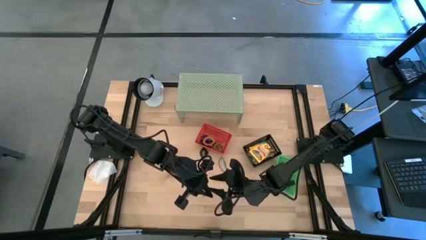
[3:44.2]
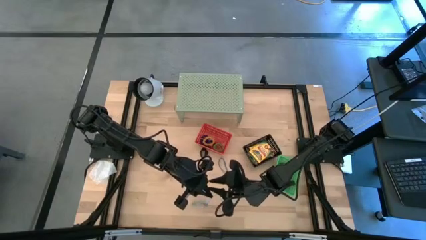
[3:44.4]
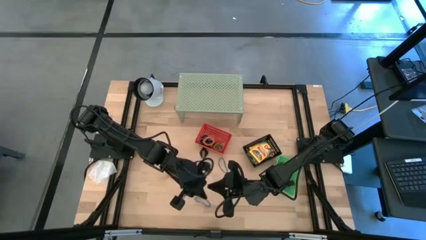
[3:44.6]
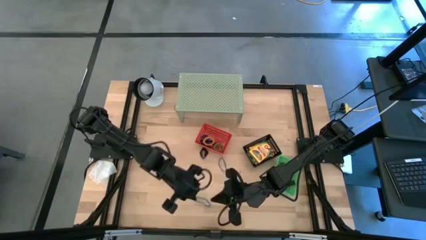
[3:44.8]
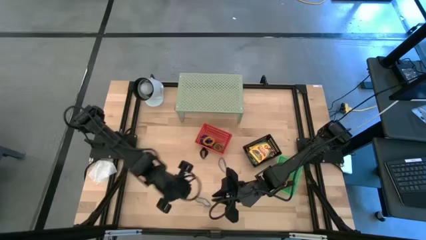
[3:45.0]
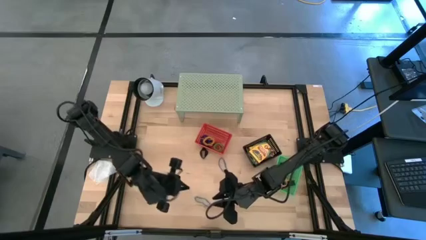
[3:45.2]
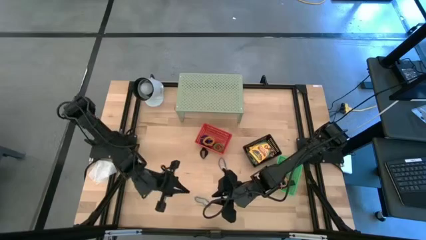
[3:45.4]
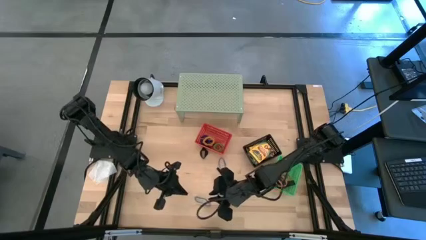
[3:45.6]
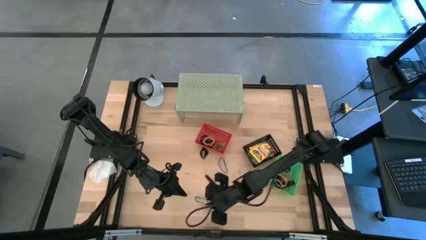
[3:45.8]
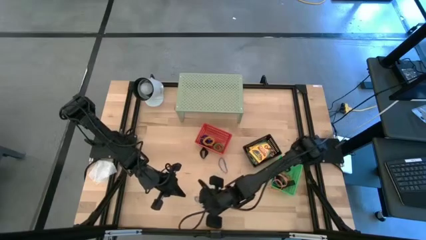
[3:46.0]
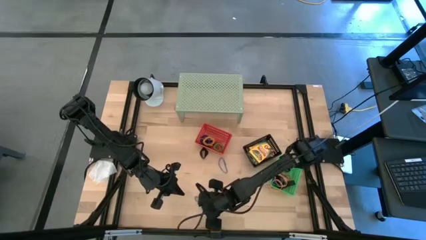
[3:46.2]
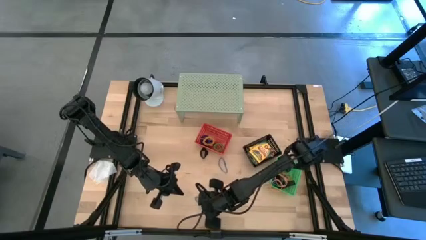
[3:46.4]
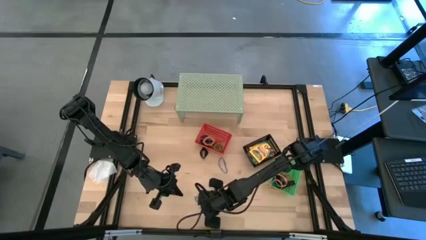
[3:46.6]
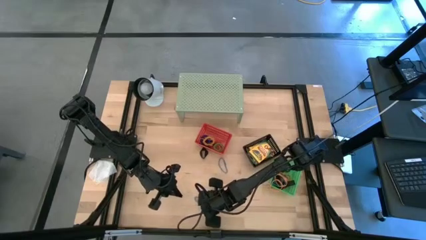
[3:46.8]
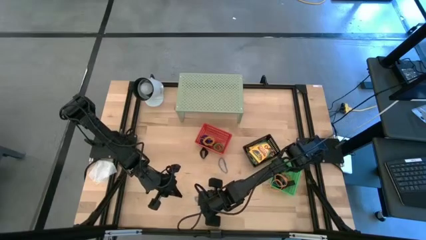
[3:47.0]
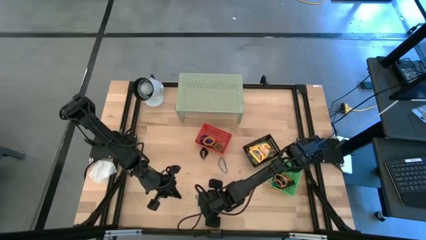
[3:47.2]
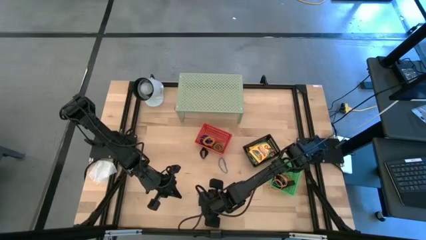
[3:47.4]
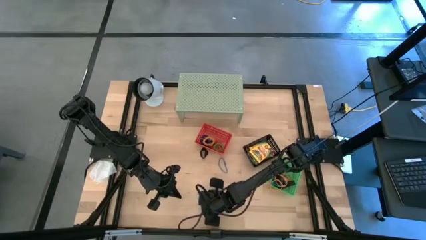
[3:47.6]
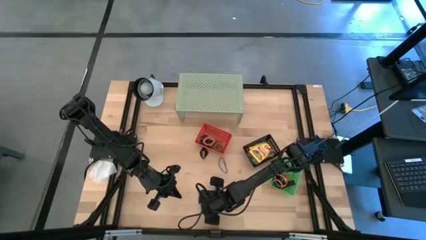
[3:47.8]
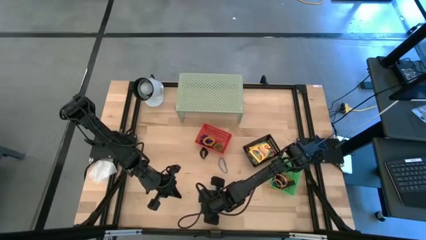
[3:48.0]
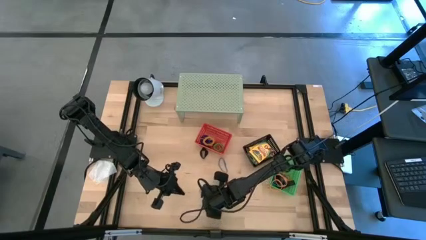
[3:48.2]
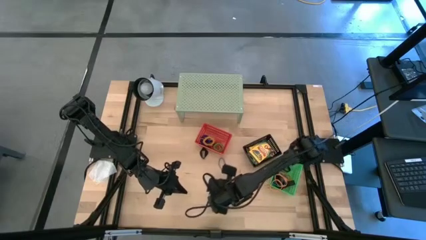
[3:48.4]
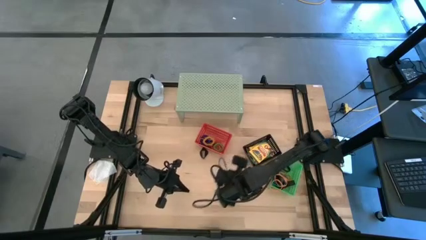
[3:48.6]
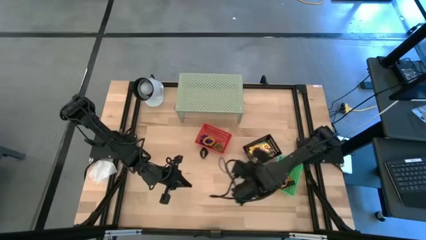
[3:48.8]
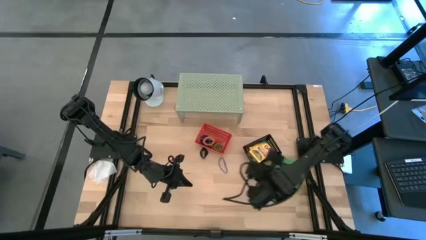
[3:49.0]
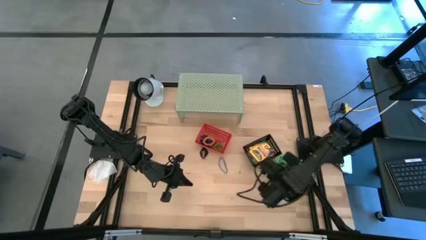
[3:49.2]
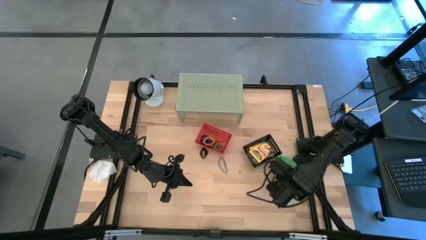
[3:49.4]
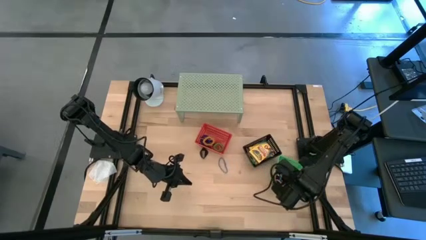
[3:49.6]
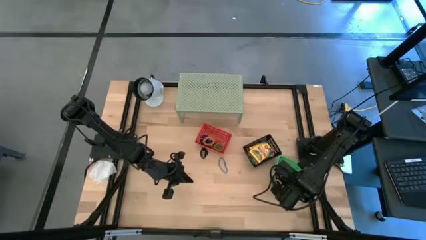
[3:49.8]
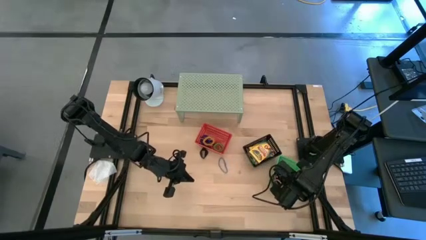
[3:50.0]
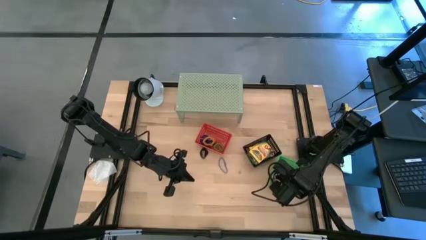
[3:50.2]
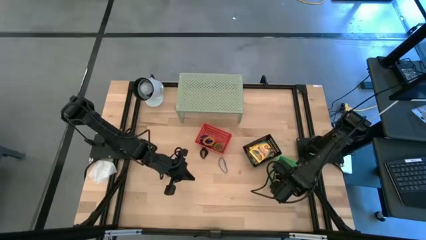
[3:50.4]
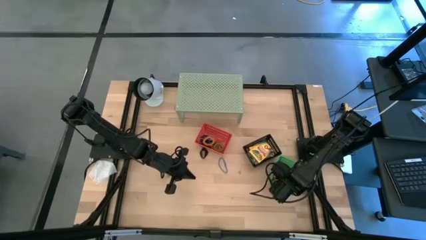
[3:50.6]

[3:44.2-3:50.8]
Task: Pick & Place Office Desk Supplies
Put the blue rubber band into the green bin

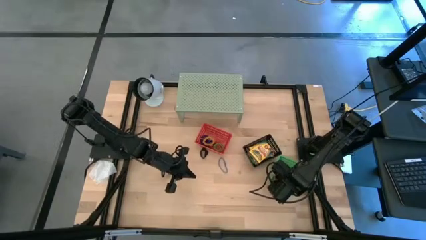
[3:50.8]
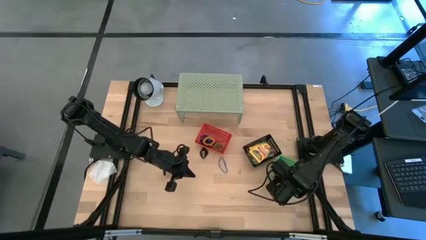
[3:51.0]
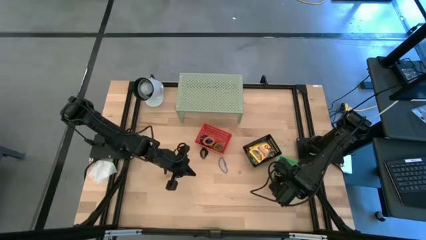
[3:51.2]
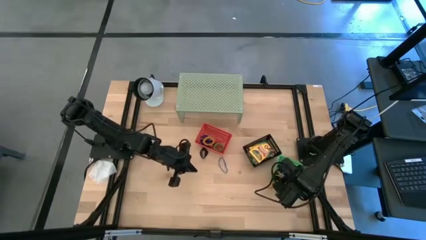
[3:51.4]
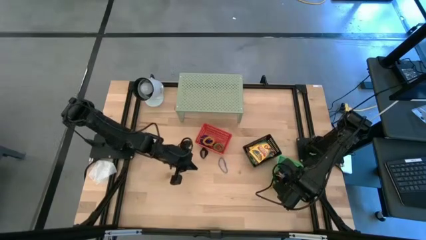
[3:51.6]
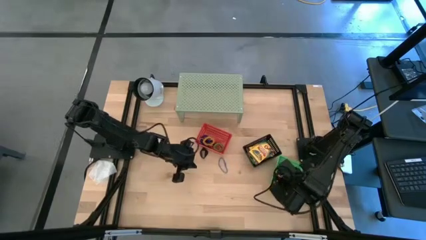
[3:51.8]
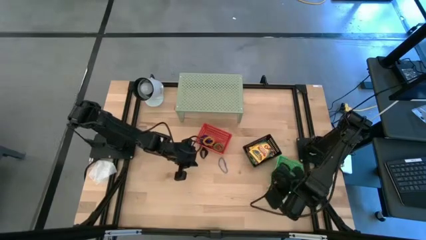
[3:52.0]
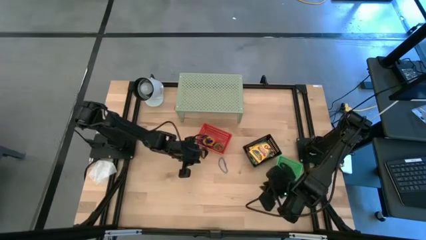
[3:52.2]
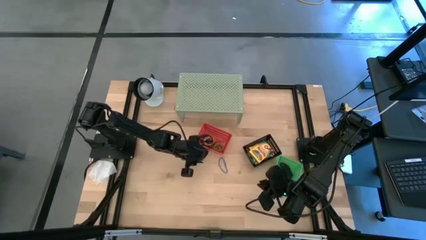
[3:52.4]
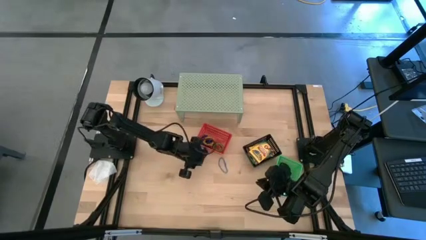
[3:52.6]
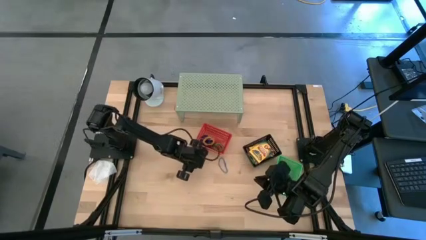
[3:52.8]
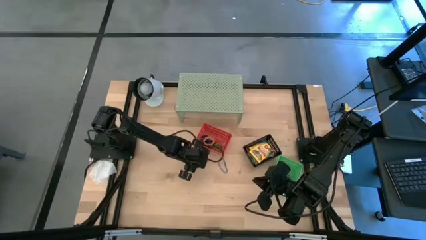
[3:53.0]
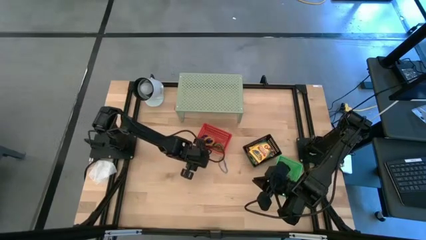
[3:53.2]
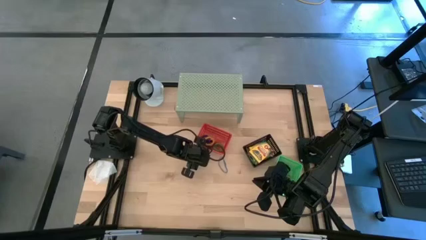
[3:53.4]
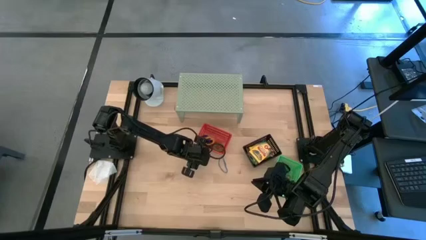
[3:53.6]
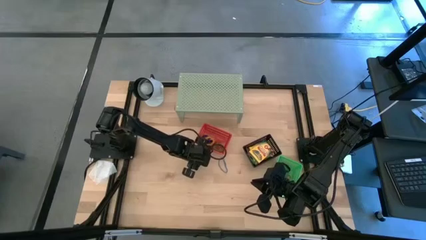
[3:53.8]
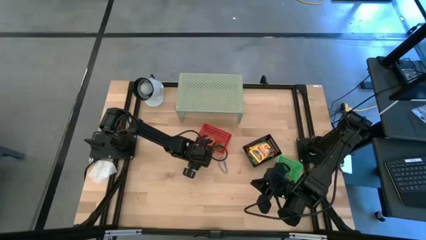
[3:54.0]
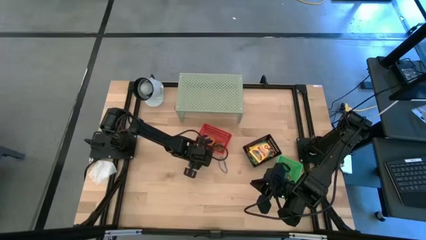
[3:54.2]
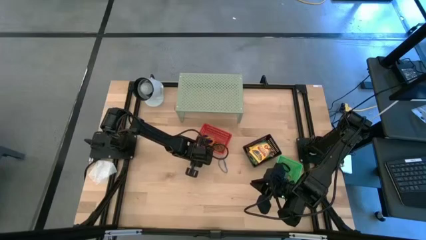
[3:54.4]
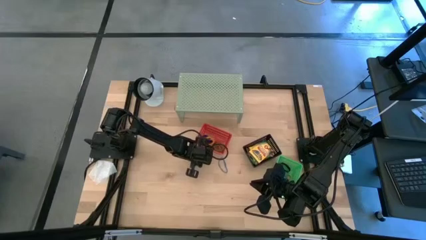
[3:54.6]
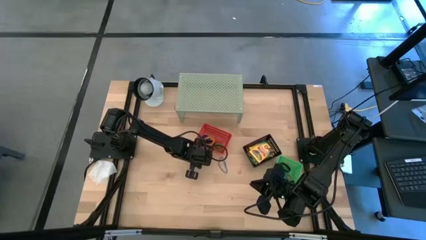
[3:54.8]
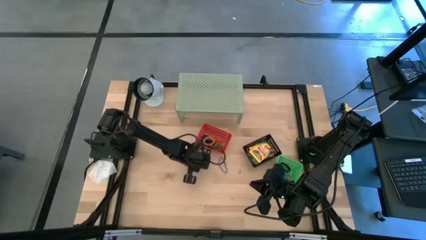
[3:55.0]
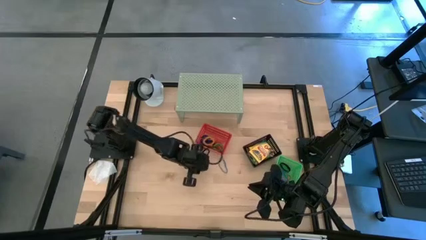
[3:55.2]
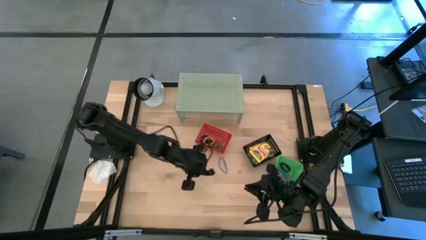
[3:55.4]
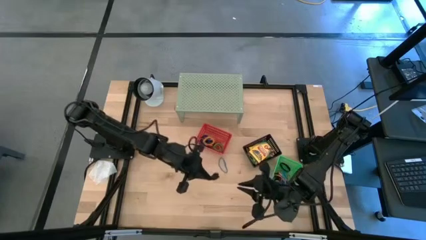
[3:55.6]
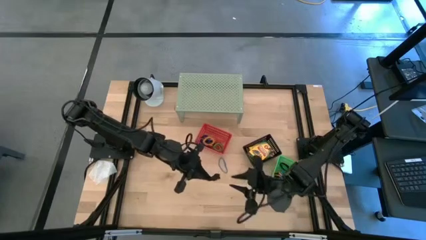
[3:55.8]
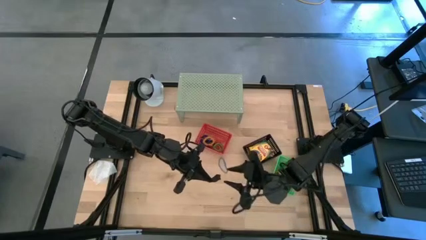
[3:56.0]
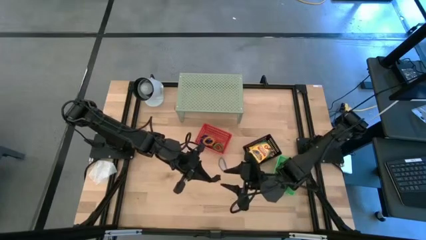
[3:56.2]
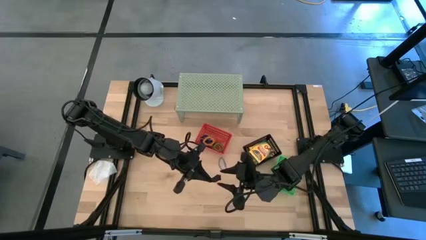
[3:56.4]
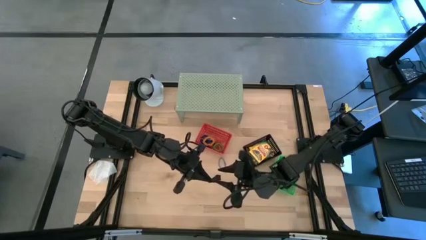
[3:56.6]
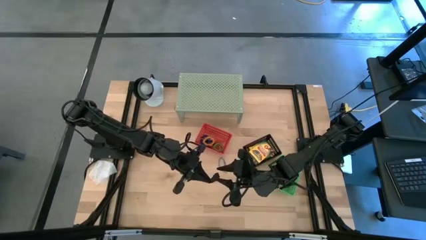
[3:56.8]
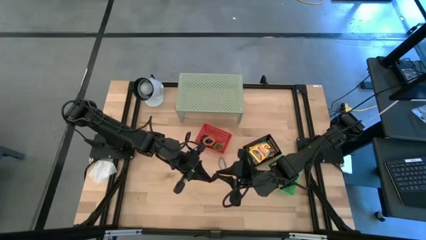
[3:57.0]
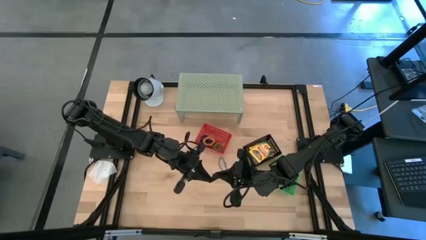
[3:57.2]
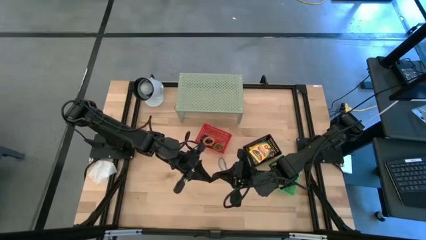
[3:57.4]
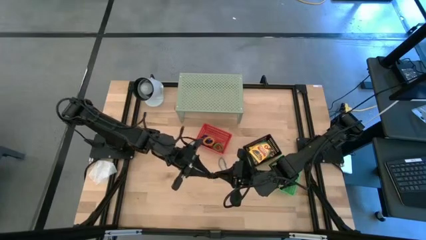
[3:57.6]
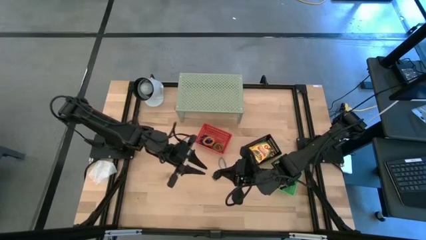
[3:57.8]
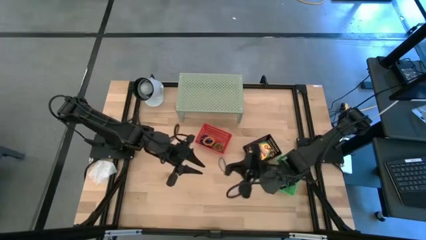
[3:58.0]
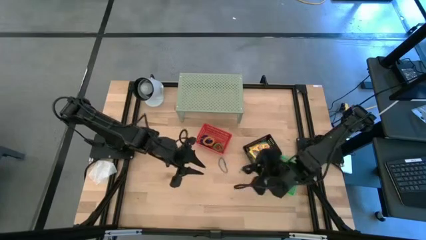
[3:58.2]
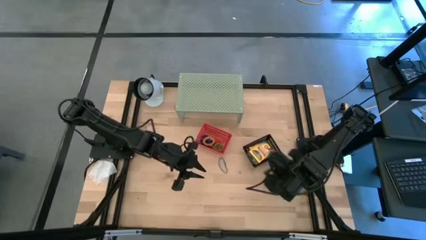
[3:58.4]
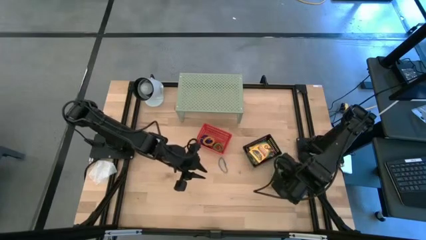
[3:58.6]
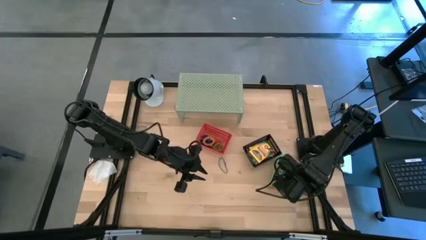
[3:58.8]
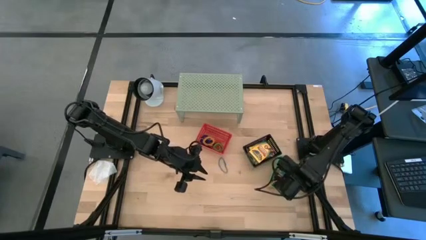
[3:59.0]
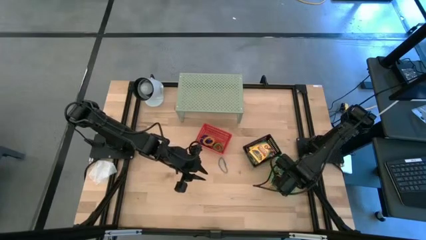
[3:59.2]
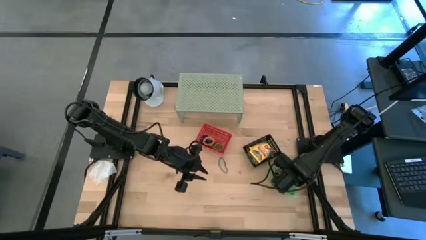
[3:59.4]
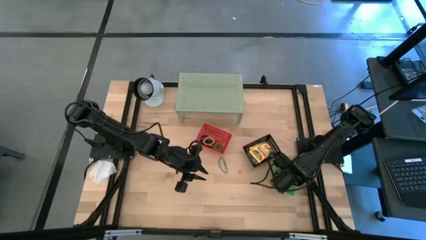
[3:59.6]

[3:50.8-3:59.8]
Put the black rubber band into the green bin

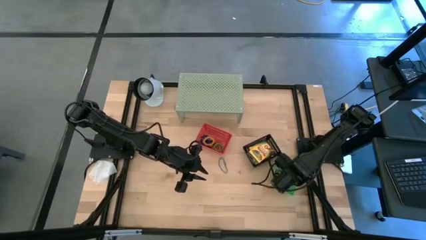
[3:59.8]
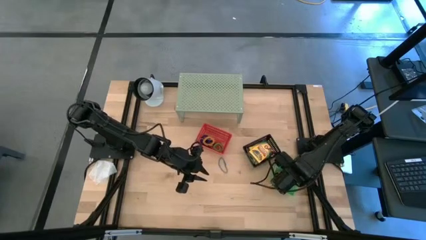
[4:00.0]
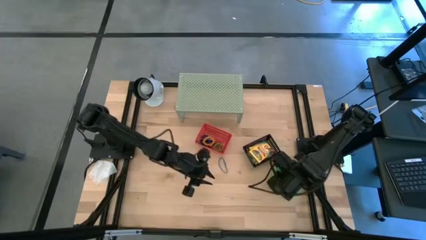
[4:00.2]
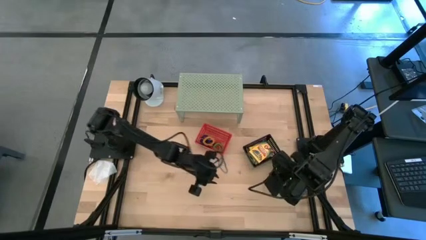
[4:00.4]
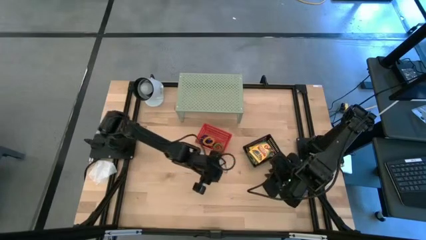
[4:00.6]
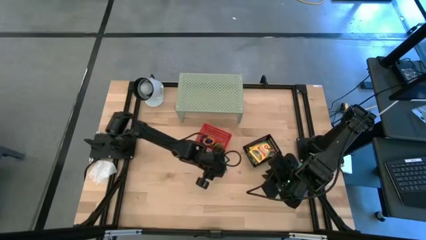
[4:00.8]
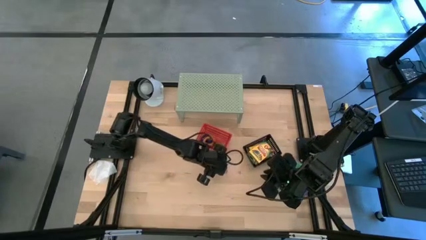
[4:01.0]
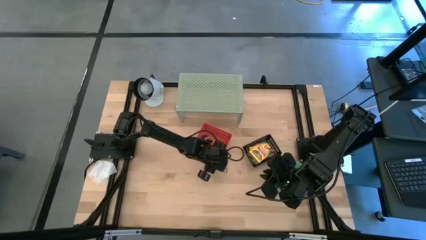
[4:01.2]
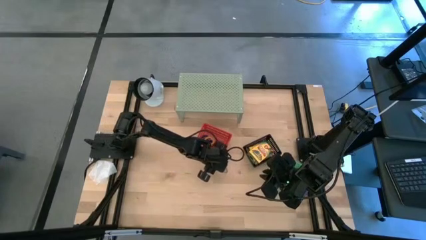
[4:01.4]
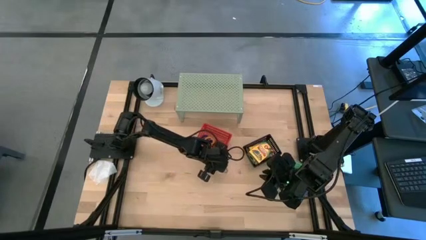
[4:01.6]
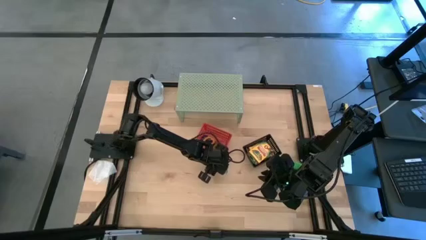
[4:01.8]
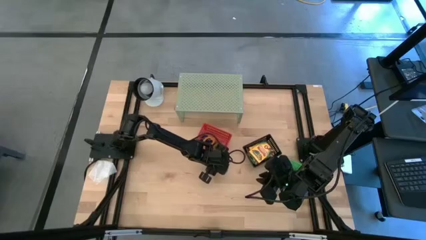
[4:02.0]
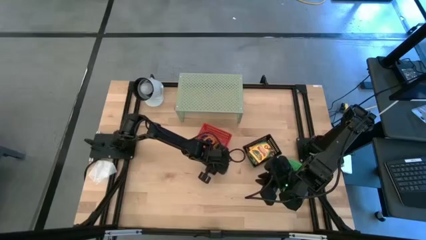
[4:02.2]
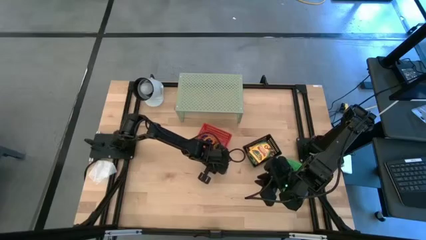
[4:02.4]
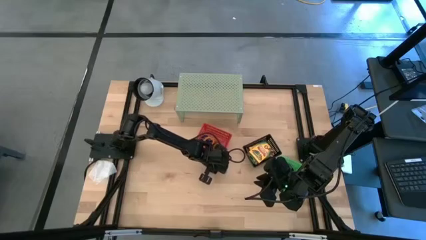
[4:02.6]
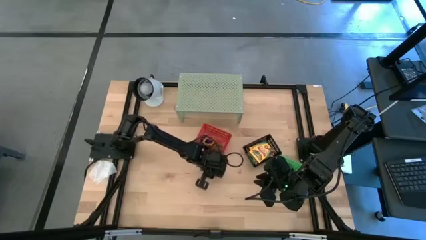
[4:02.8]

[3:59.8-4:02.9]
Put the blue rubber band into the green bin
